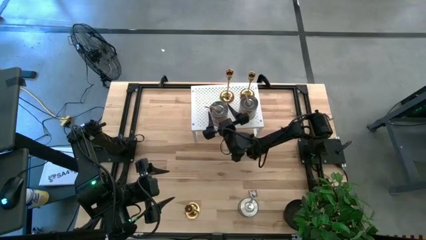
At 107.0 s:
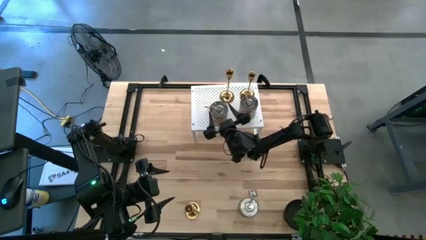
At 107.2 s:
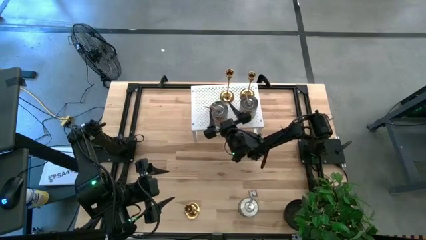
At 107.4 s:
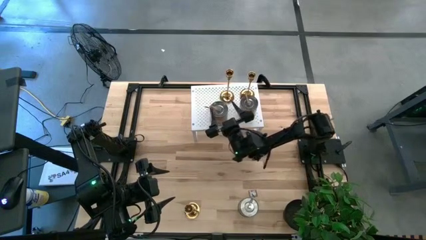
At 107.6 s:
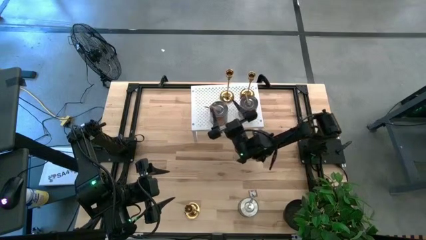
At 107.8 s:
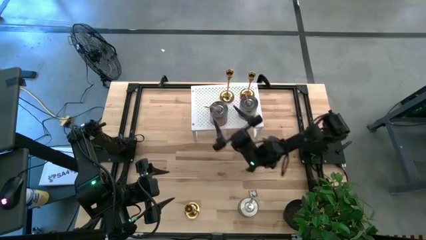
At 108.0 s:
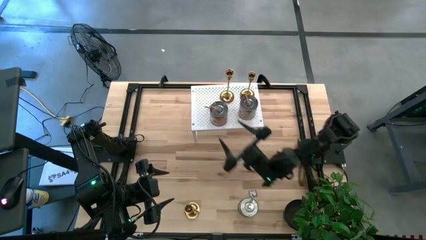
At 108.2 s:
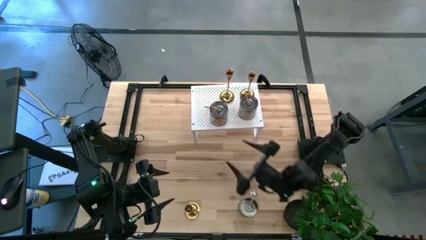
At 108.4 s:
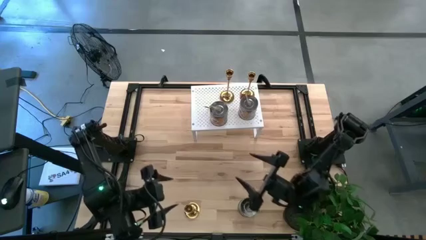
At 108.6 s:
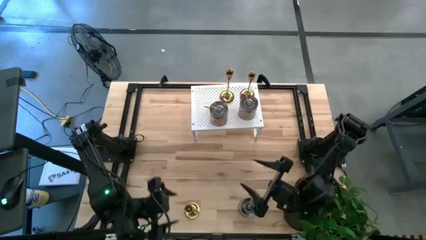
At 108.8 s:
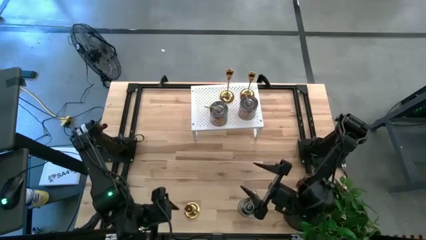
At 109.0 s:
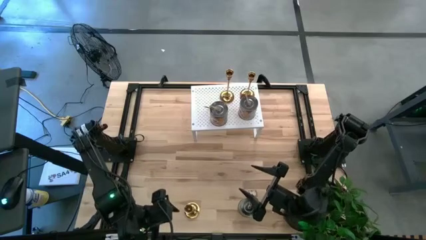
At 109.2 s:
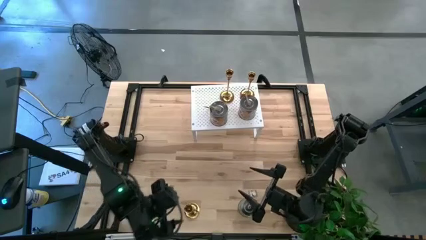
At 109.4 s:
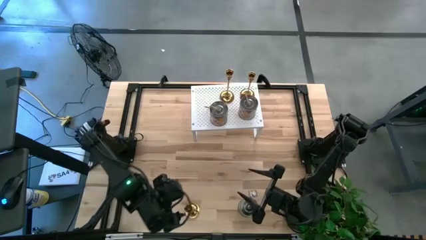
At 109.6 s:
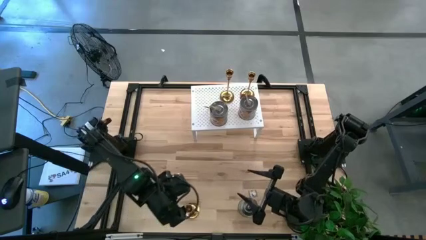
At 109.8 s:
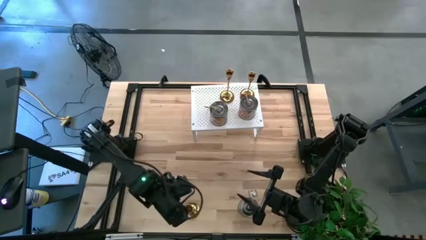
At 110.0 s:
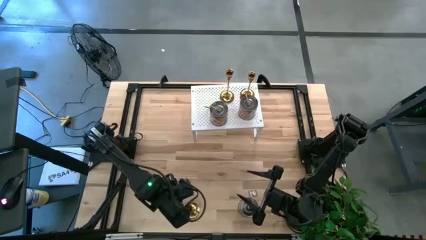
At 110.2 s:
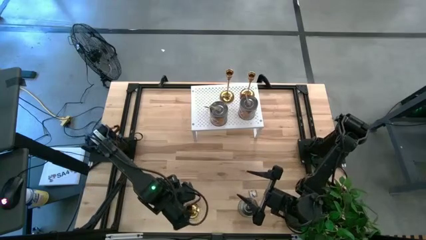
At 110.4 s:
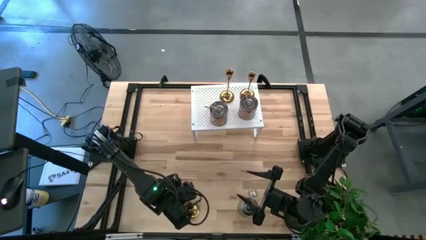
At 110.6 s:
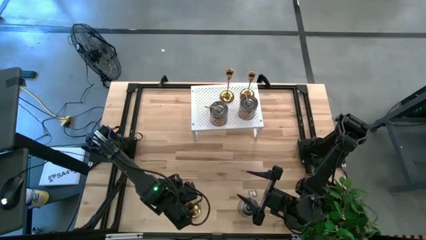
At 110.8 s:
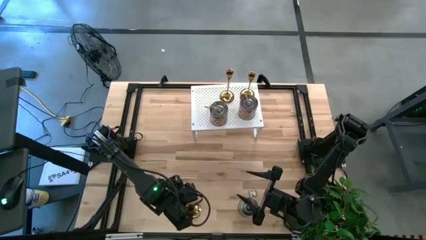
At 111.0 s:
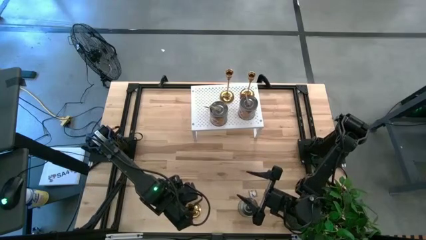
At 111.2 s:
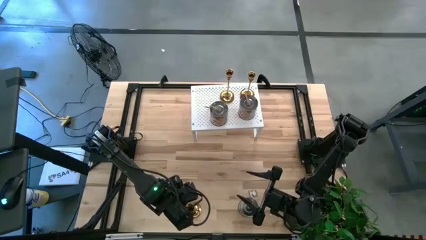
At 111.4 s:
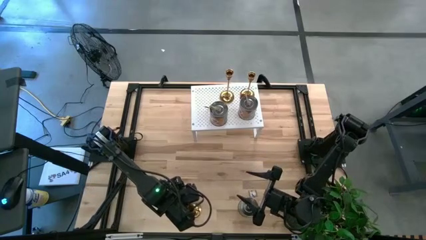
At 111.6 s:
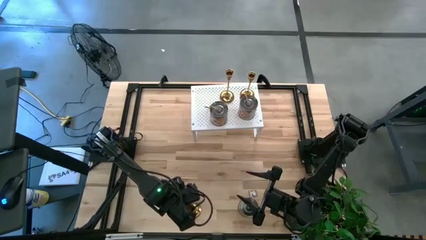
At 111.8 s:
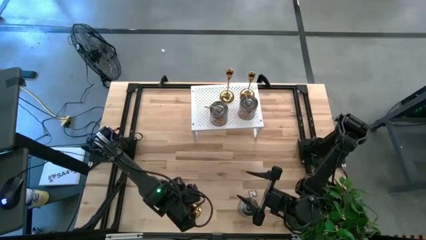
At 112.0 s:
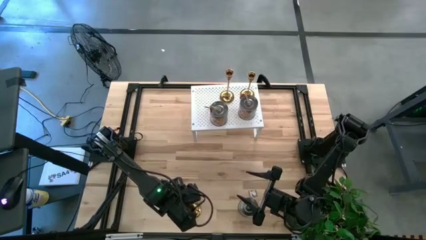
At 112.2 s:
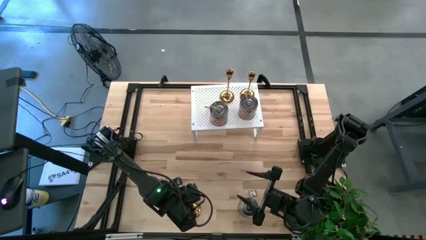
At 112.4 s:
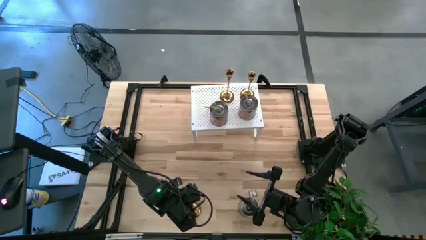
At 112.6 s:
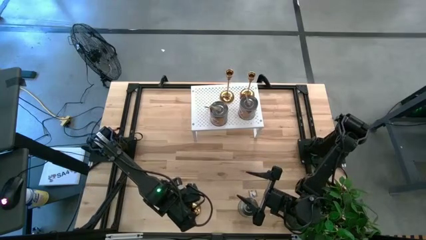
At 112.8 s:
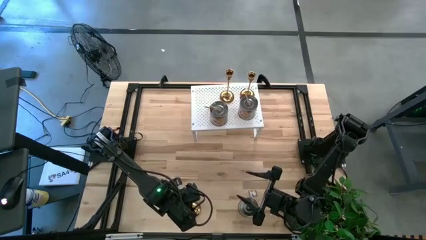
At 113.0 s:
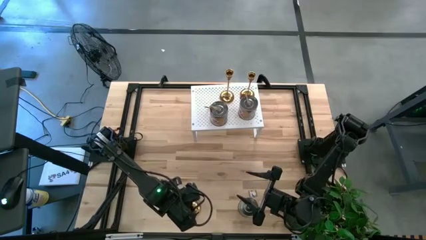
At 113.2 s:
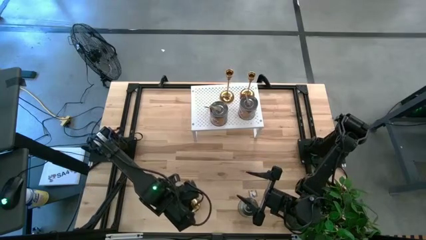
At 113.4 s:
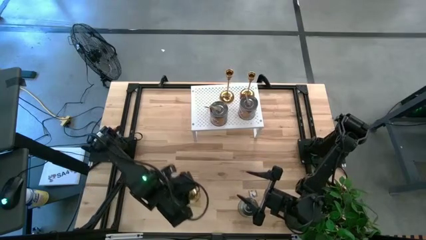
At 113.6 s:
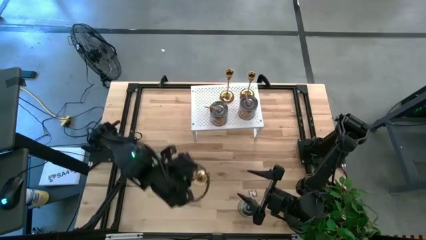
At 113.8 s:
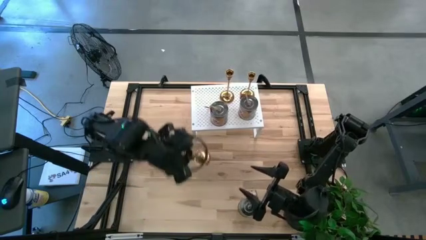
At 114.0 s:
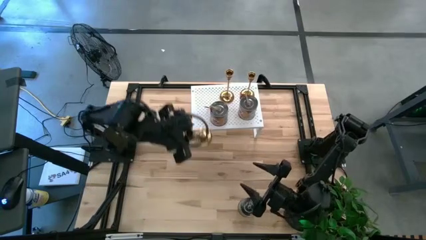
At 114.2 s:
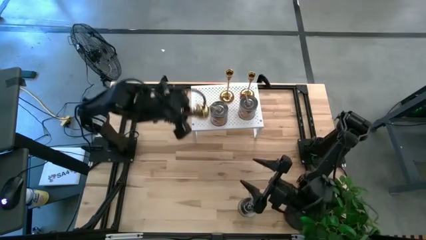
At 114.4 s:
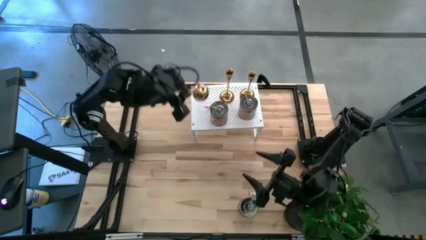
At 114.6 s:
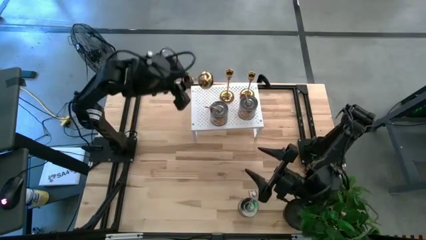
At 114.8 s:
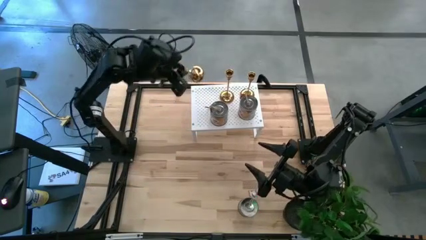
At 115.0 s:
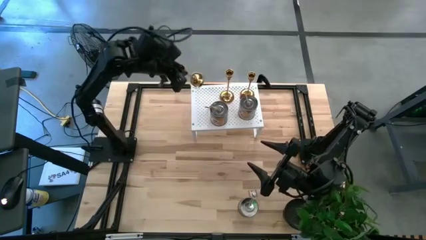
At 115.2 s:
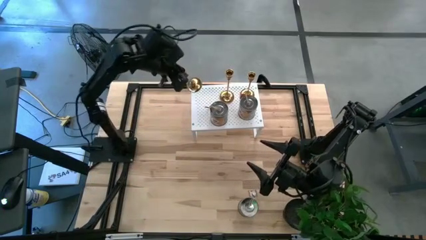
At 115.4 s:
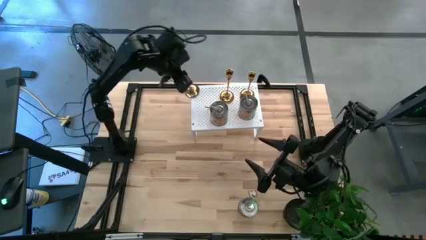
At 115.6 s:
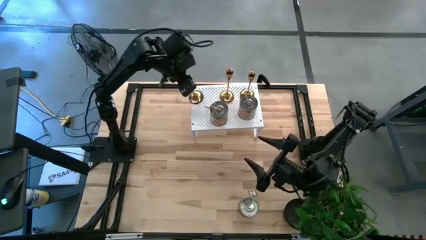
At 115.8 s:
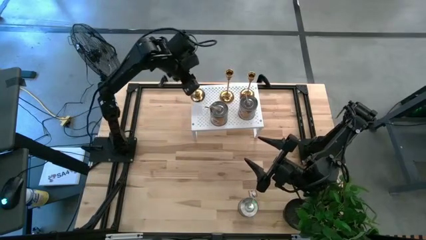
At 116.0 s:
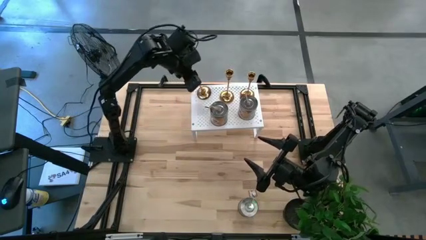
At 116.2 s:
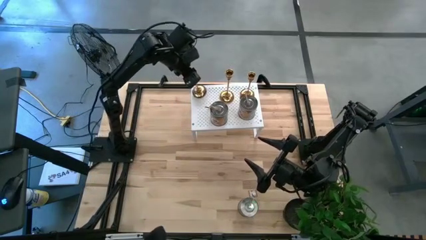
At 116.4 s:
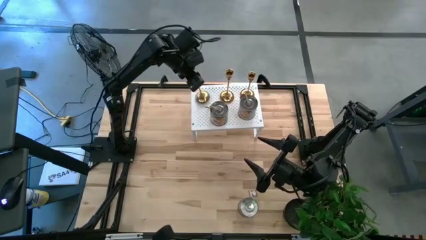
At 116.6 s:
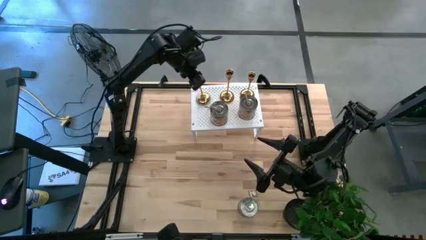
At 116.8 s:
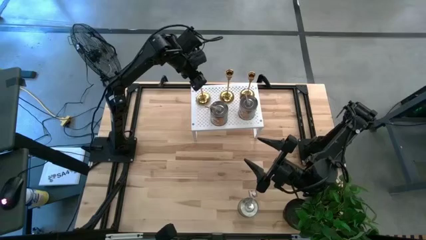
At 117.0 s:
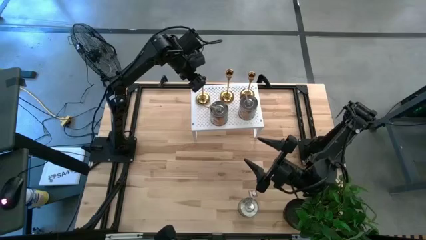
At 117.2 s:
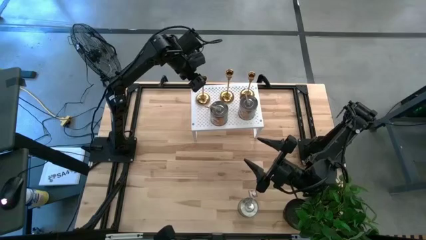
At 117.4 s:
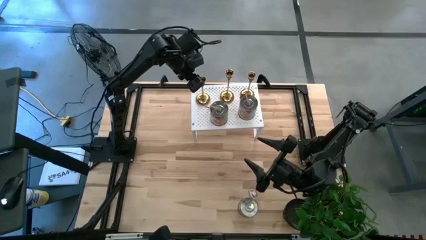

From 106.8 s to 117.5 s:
Task: Pick & Place candle stick holders
Put the gold candle holder on the shelf

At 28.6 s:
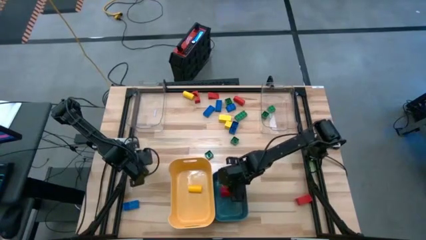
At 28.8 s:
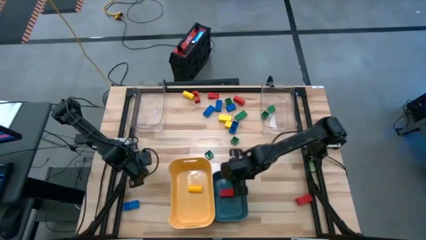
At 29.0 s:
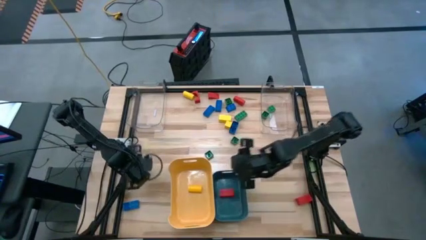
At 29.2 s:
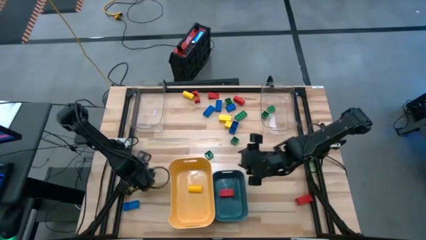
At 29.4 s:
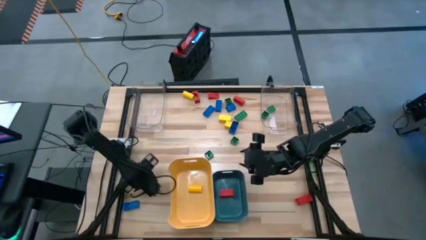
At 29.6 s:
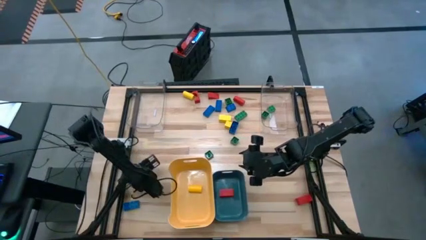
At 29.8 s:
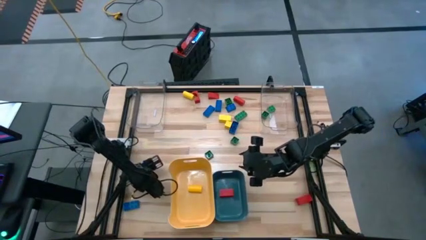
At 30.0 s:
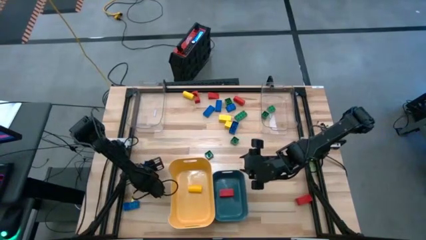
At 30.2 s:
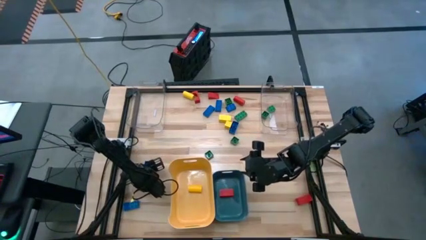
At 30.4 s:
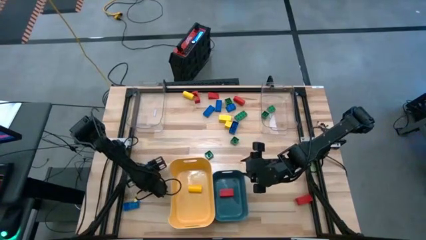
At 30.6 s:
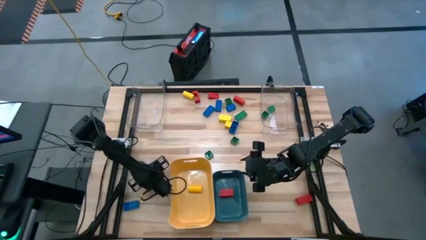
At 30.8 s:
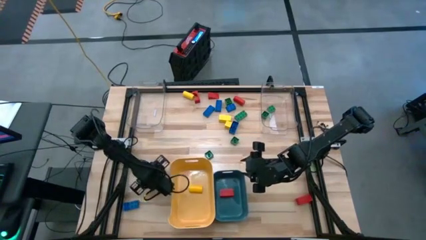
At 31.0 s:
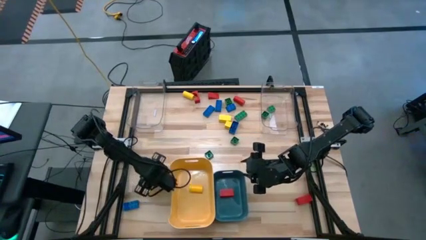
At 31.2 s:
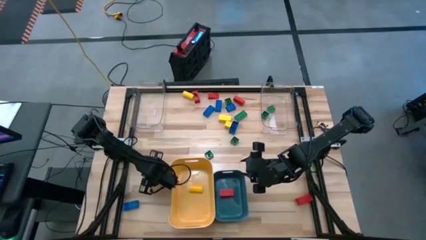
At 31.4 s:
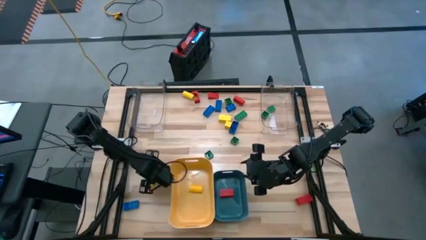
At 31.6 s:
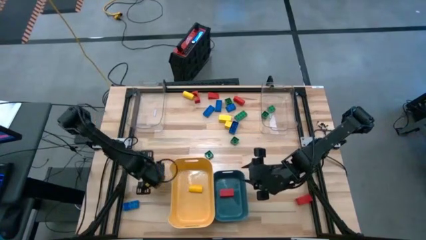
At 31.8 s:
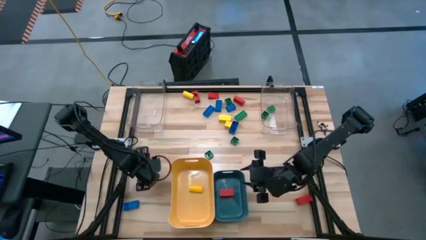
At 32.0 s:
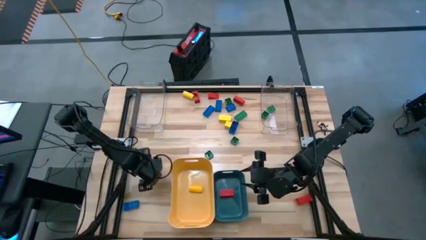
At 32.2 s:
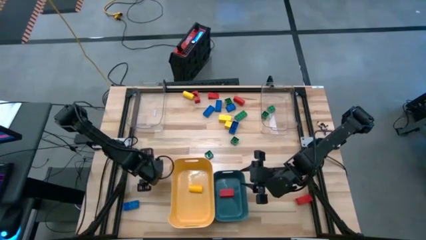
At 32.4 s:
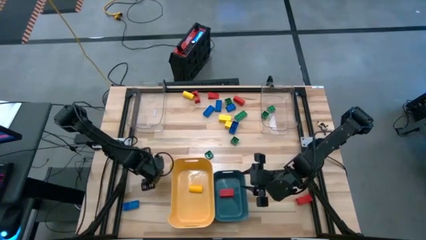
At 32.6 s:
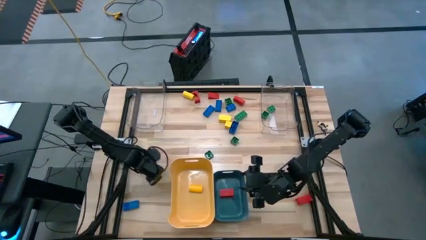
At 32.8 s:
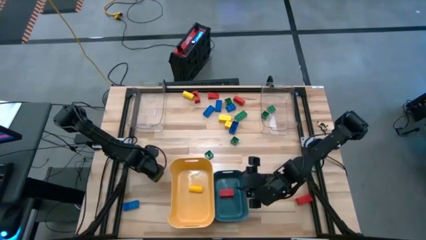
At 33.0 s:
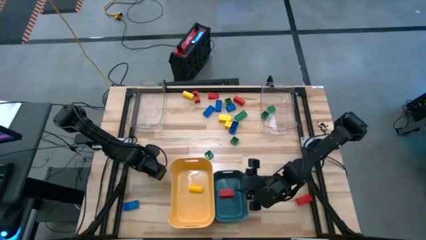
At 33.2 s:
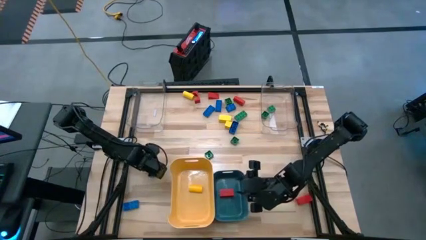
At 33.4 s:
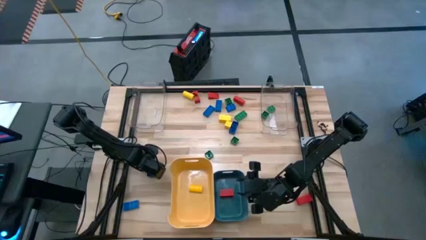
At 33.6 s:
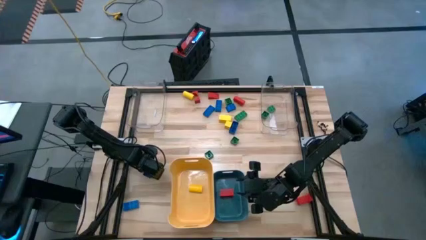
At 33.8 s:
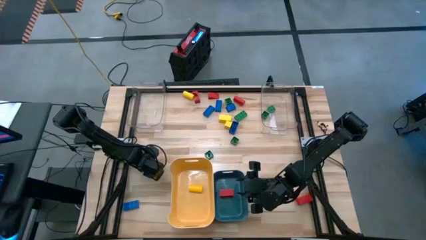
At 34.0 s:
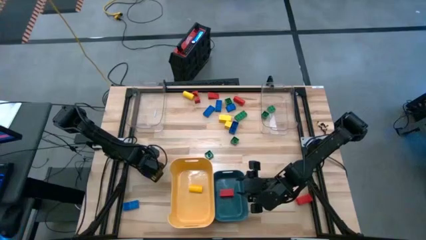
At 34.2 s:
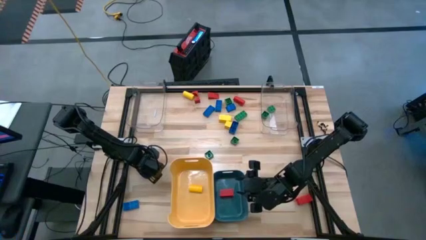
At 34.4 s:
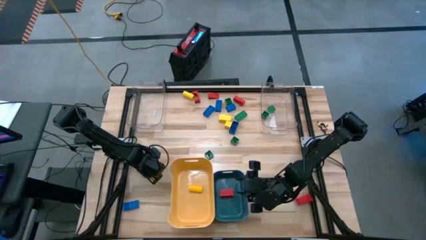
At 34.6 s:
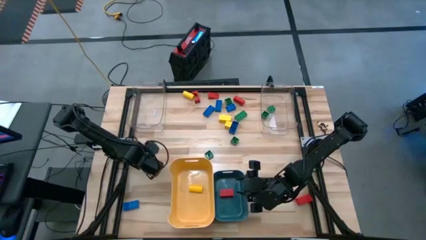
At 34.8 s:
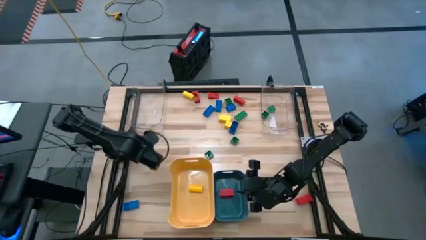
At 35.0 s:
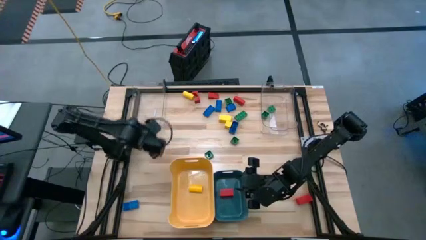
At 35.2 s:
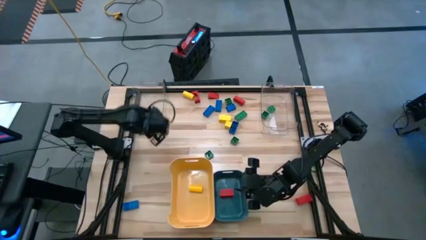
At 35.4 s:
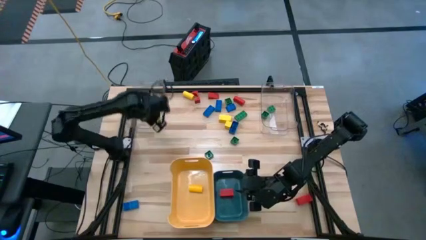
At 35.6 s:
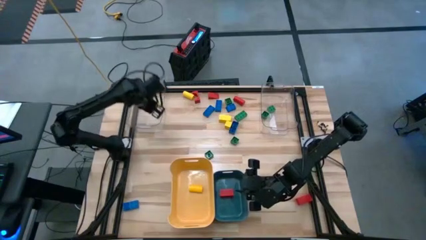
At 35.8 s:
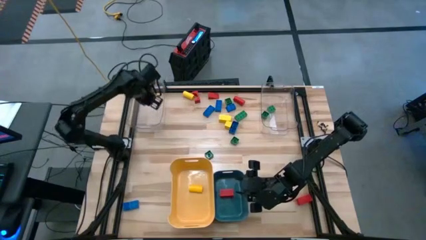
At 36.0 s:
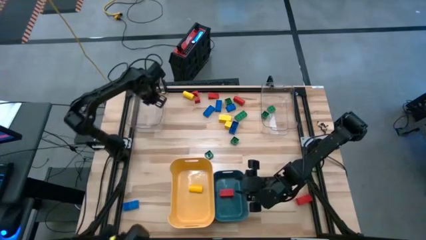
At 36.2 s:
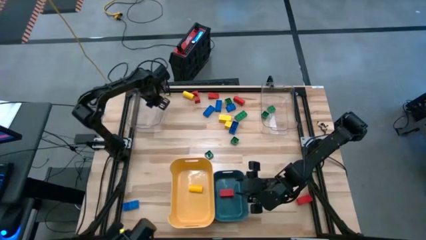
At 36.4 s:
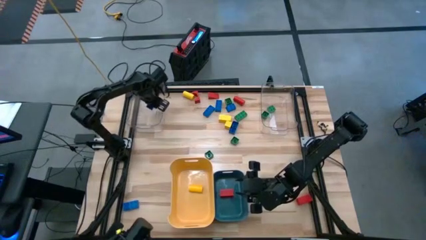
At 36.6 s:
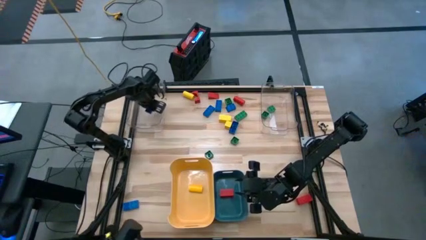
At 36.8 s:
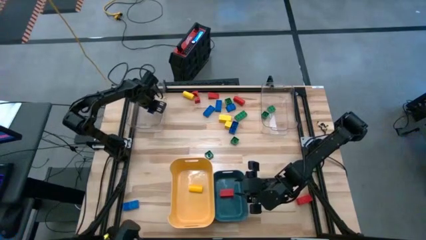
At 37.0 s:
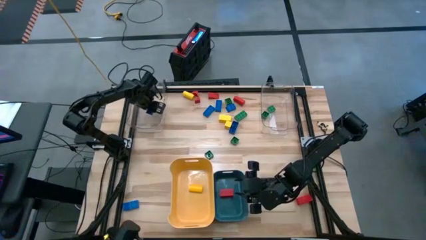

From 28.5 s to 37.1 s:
Task: Sort blocks
Put the blue game piece into the left transparent bin
